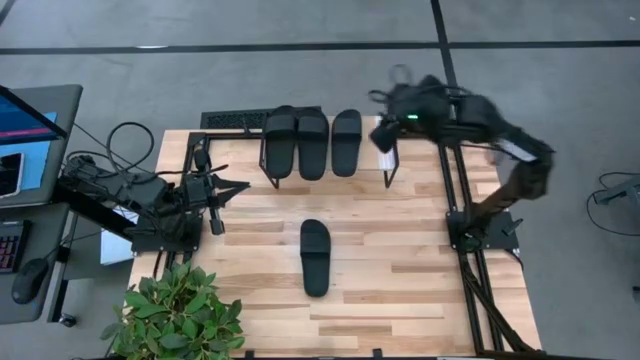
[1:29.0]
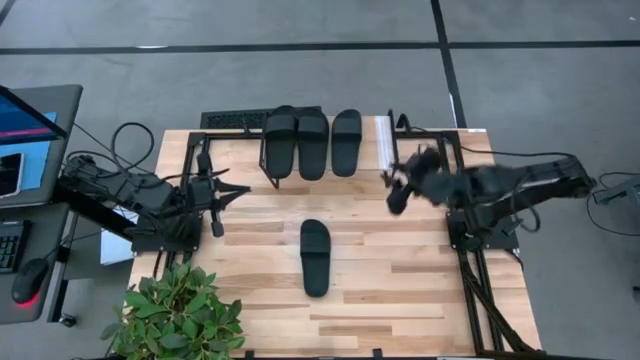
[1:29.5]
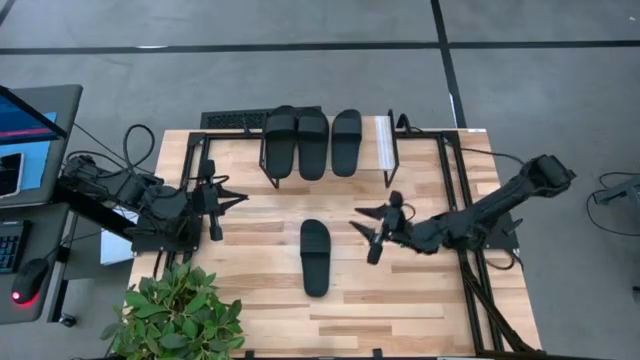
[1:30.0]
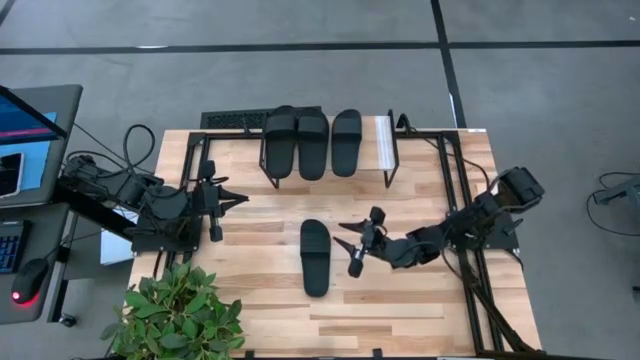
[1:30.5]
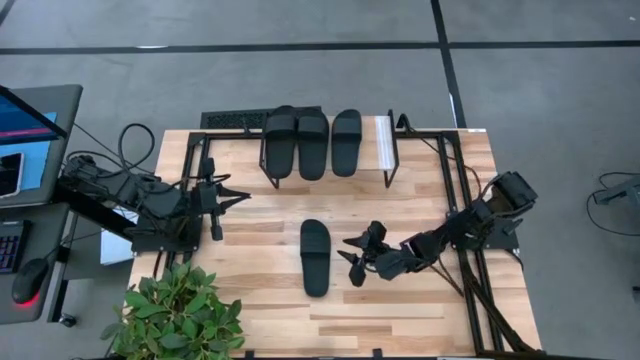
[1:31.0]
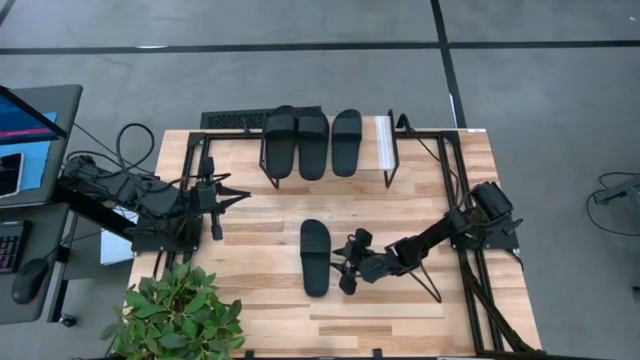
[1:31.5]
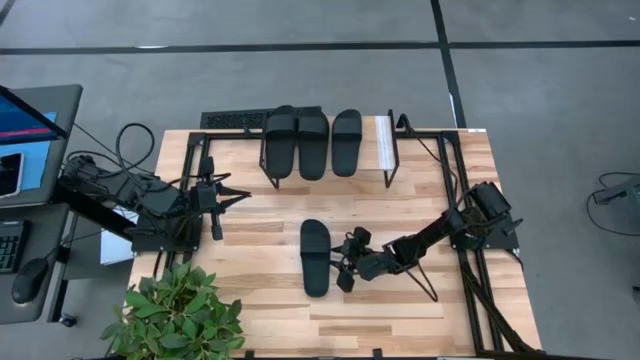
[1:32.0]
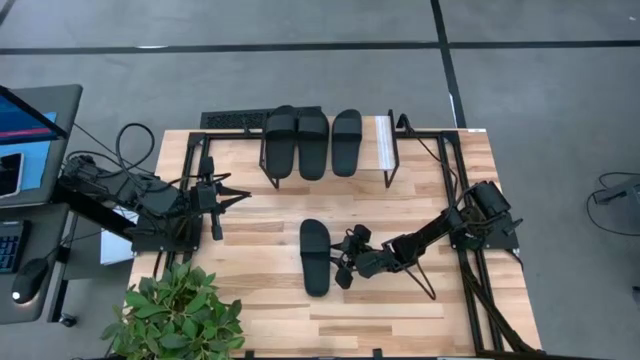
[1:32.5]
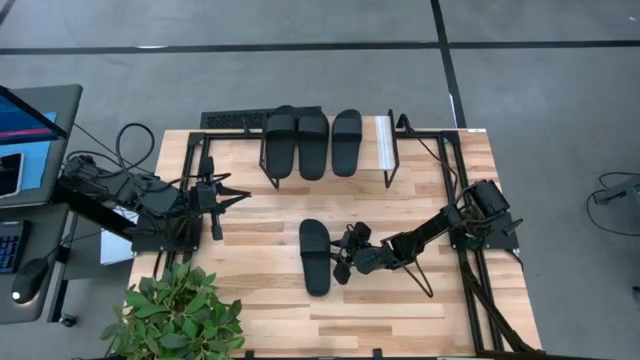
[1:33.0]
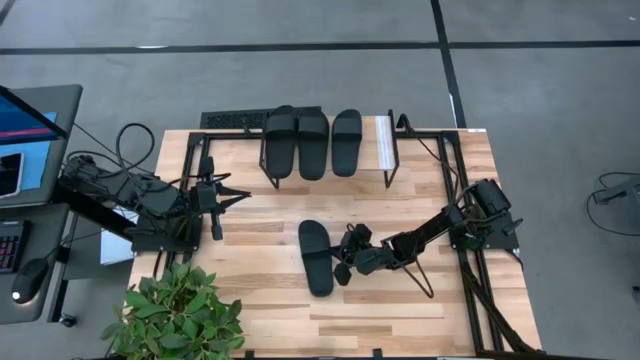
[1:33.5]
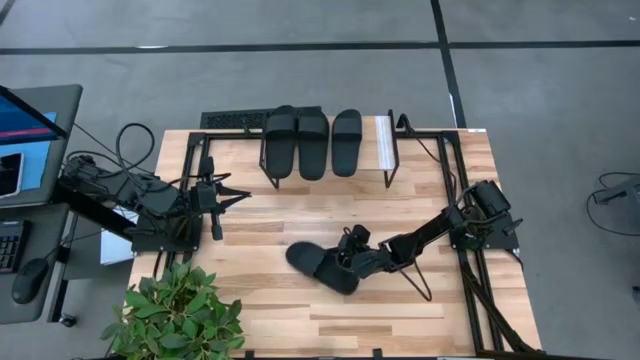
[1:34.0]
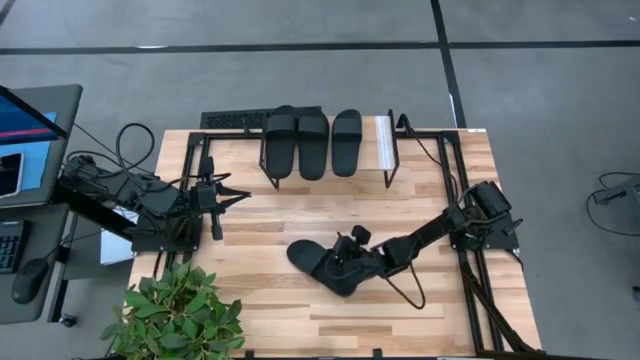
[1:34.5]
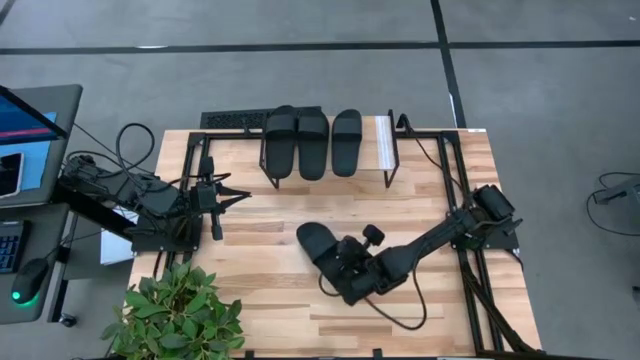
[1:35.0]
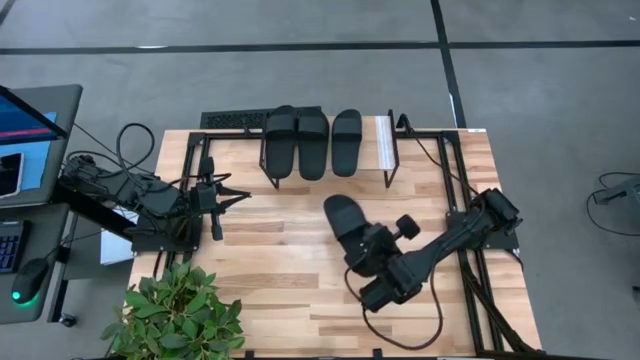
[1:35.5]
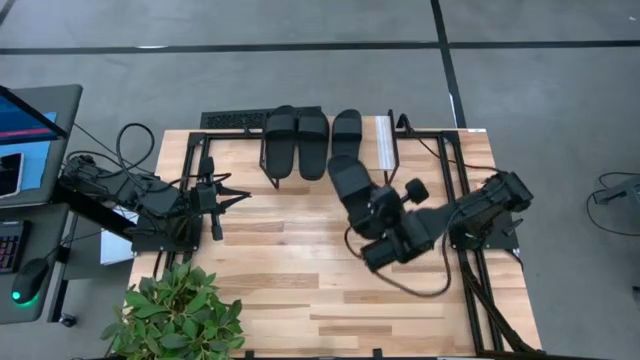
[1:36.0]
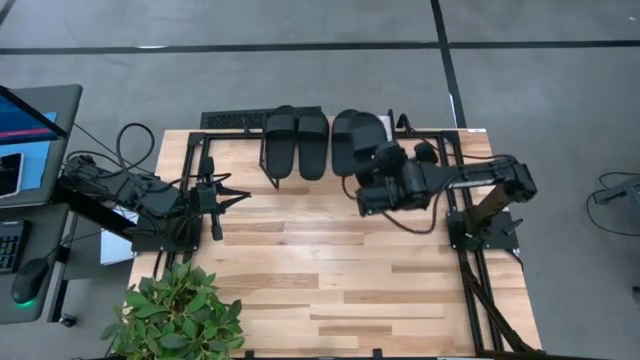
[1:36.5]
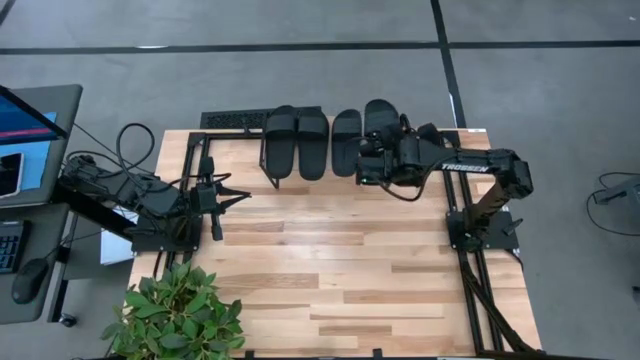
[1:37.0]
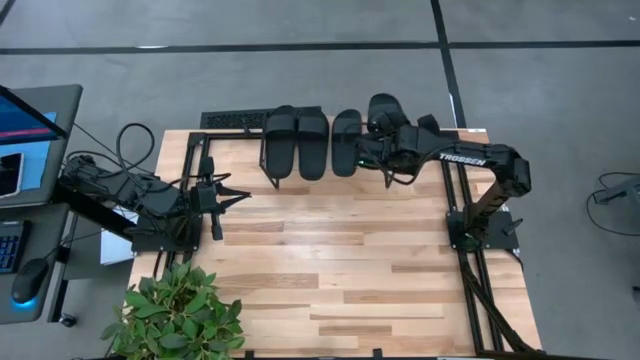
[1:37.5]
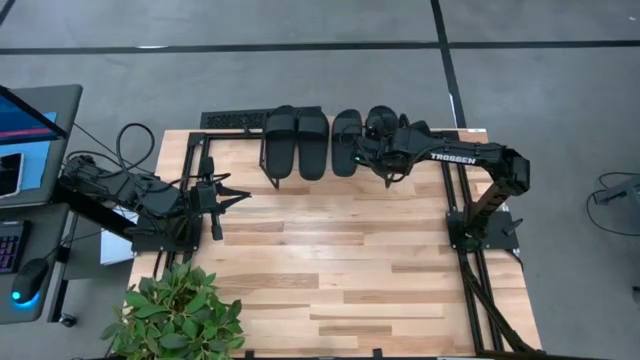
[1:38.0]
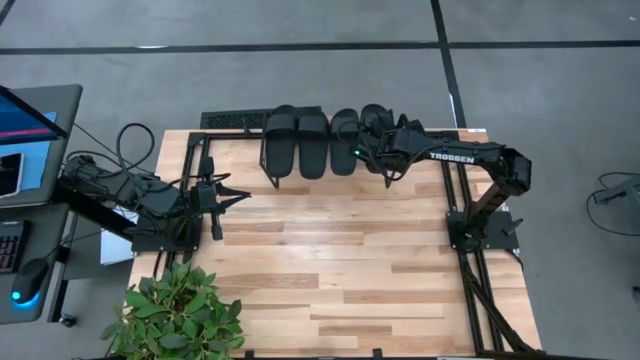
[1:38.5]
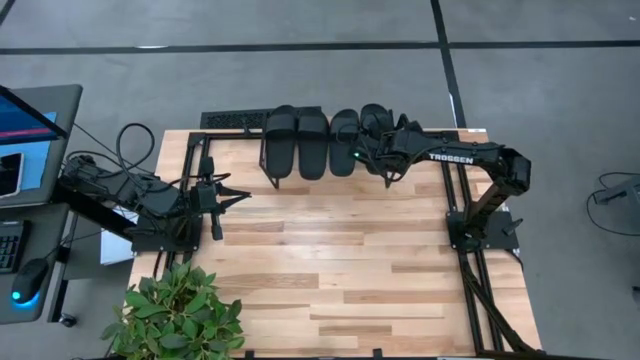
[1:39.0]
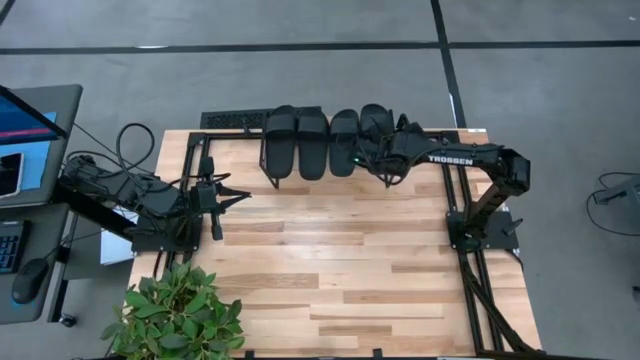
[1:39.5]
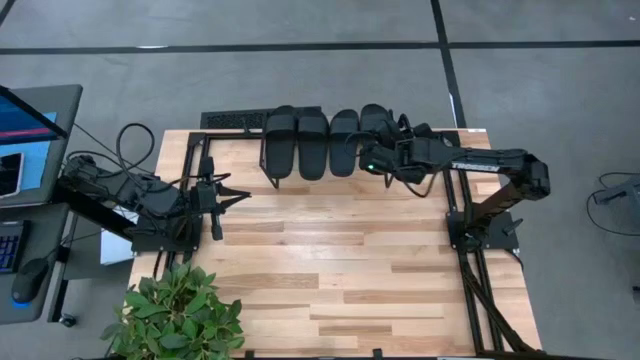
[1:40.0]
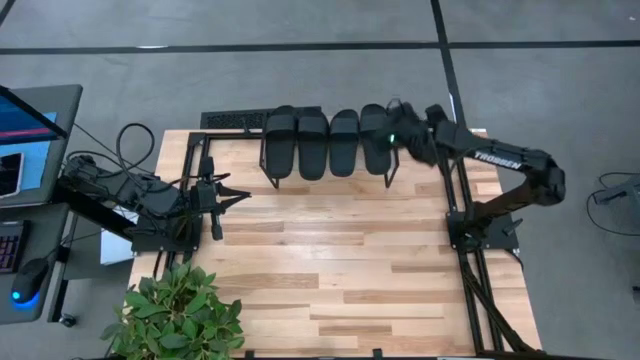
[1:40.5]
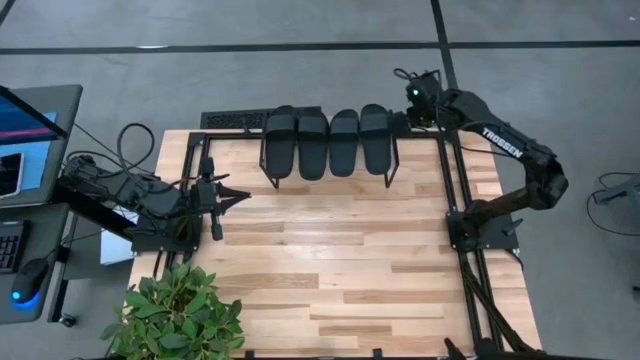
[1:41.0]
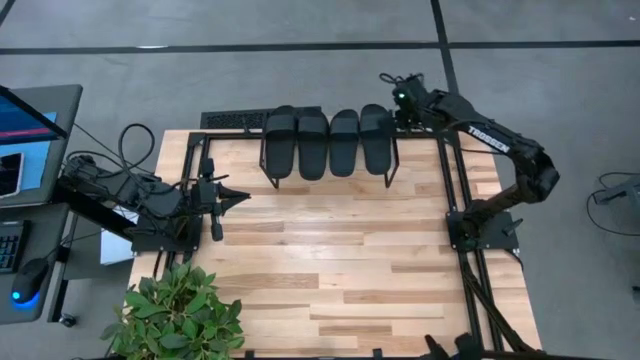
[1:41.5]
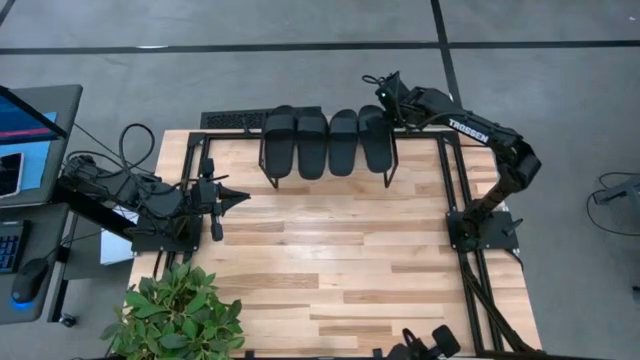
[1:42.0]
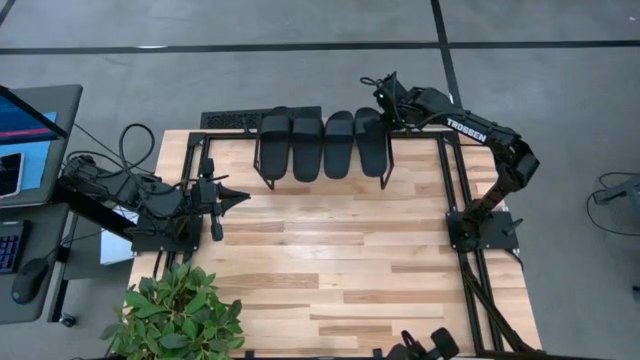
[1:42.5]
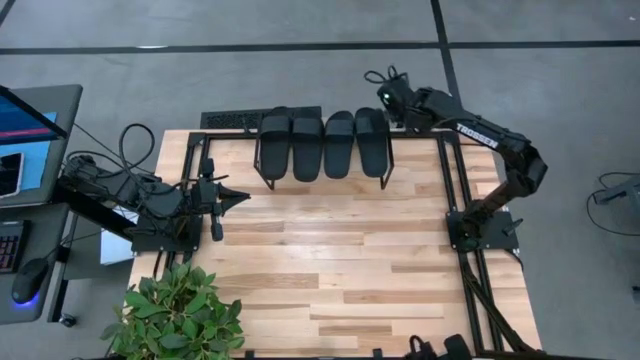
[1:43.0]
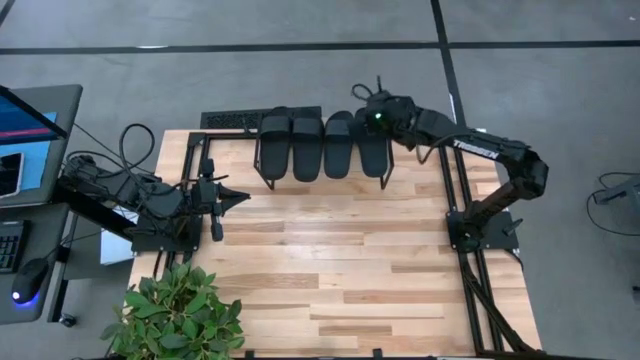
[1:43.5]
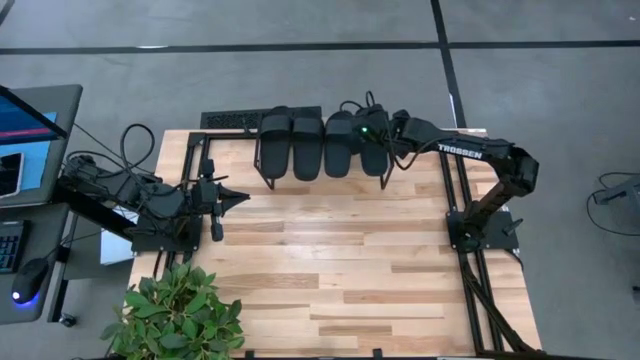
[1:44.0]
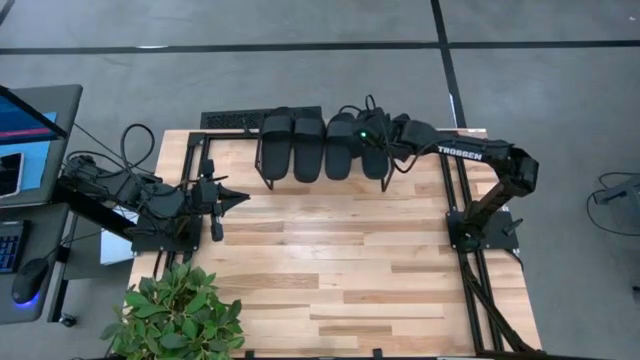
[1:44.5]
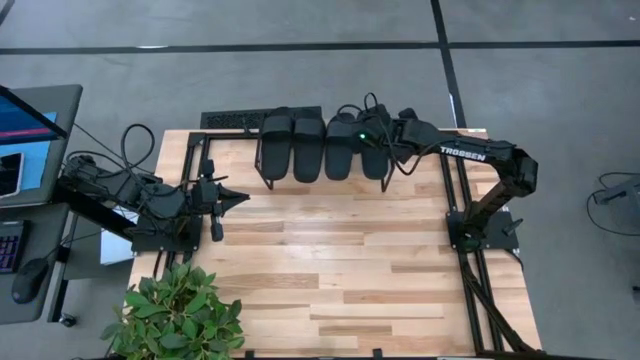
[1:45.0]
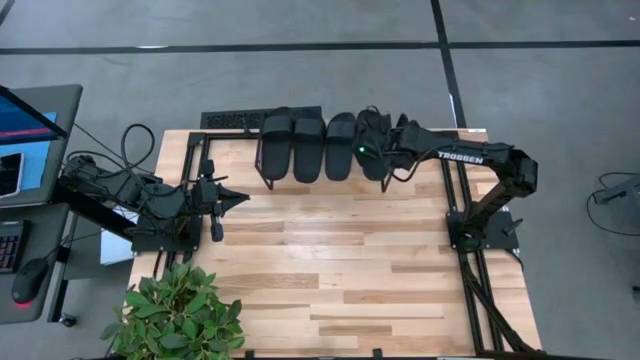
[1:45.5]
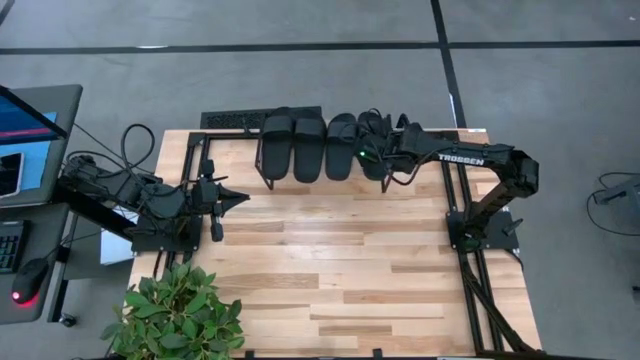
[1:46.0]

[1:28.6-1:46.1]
Task: Pick and place slides into the shelf
Put the black slide on the shelf

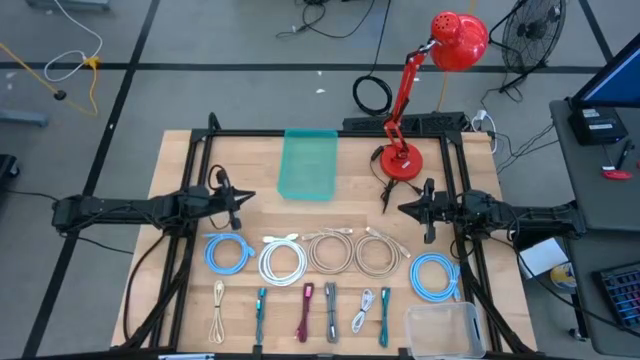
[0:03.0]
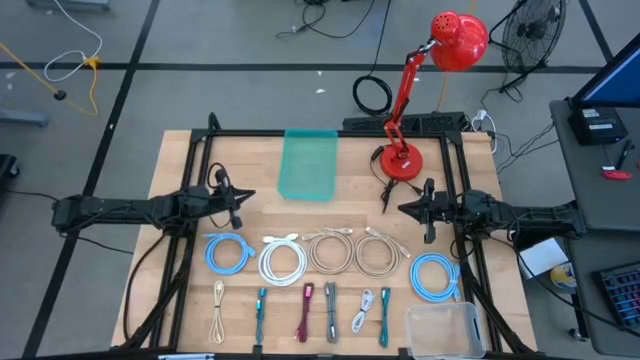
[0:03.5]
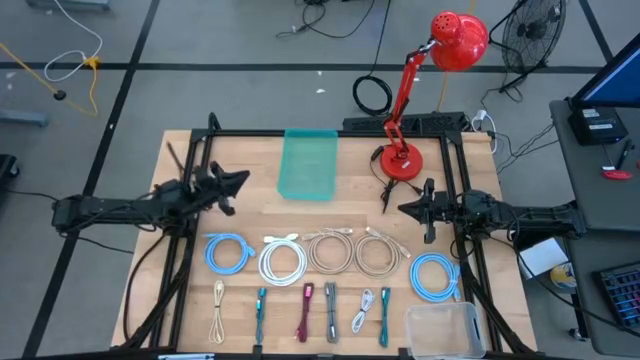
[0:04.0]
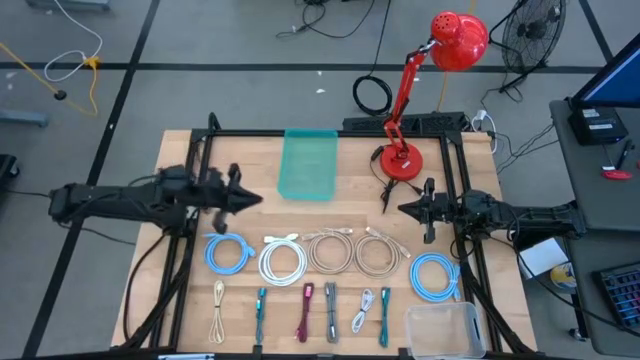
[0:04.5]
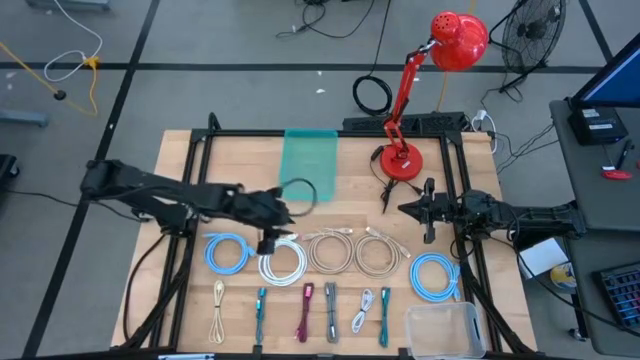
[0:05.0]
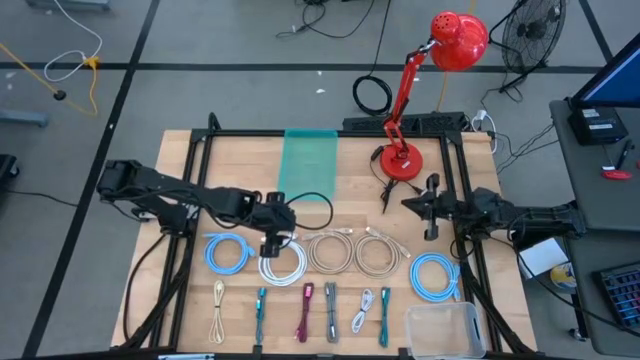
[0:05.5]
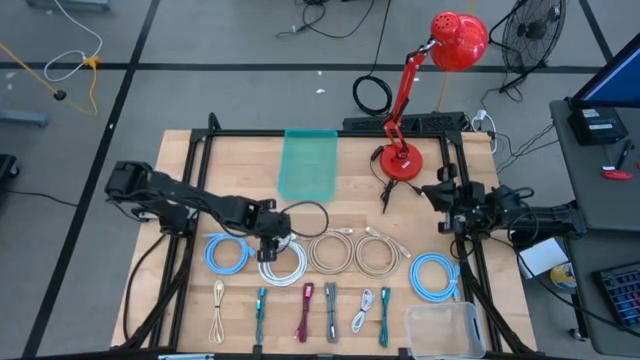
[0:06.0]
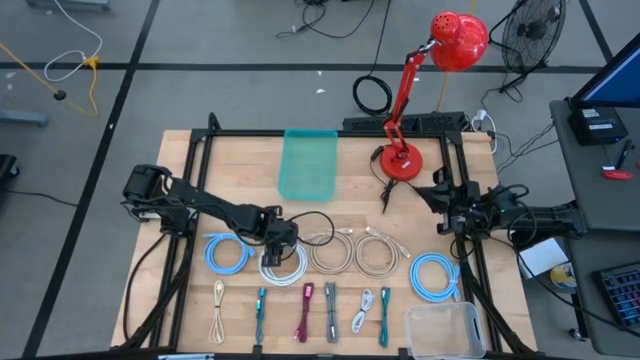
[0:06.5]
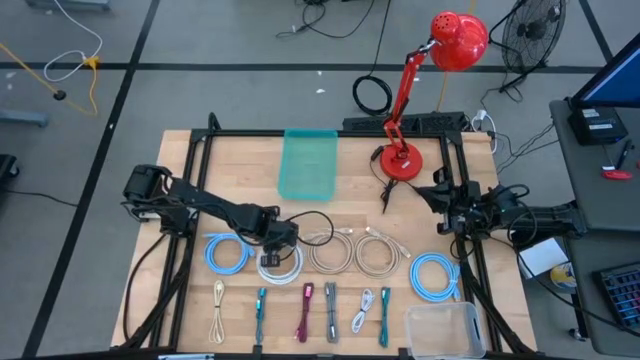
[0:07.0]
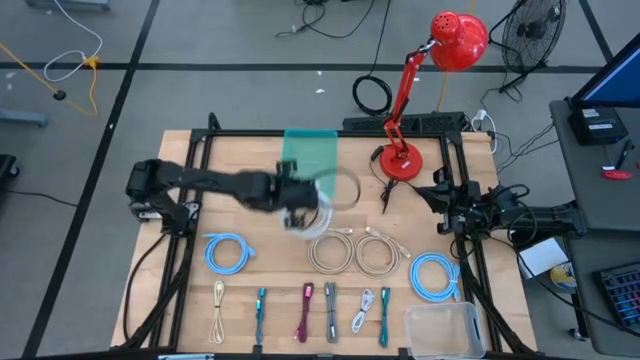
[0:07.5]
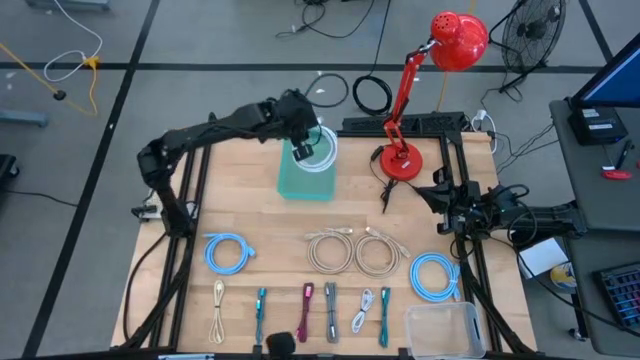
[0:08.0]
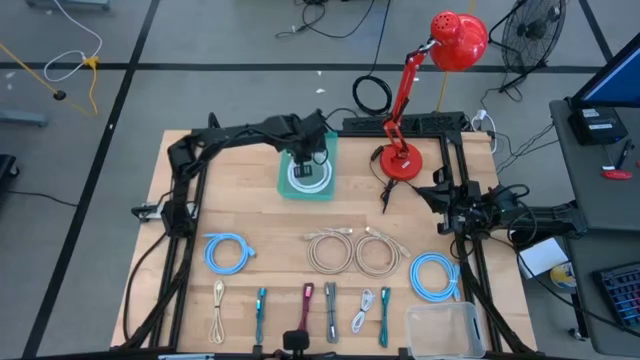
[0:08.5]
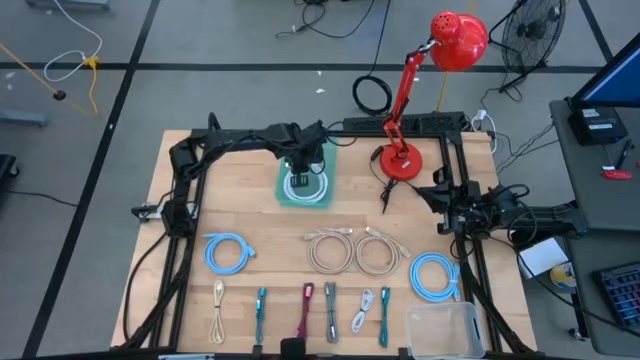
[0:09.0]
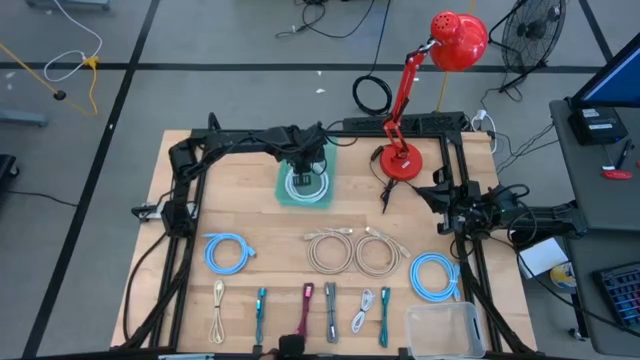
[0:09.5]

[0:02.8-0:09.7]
Task: Pick & Place USB Port
Put the white HDMI cable into the green bin
